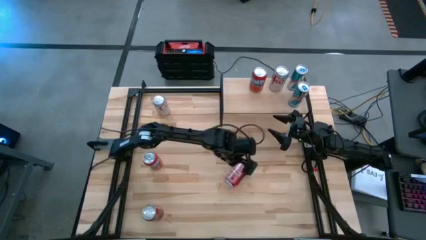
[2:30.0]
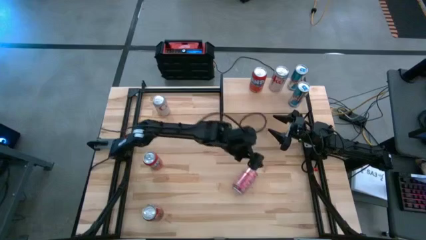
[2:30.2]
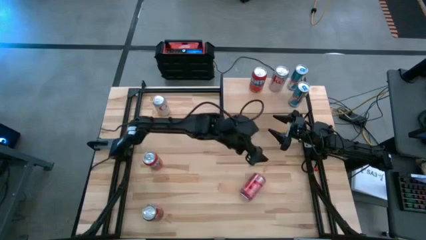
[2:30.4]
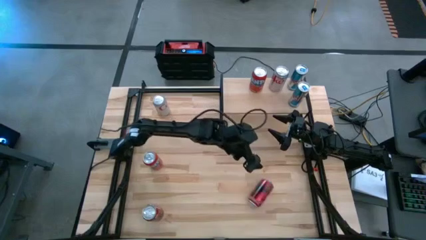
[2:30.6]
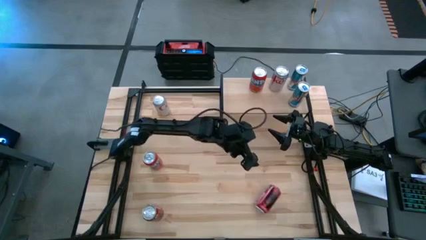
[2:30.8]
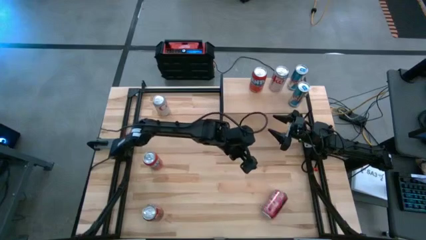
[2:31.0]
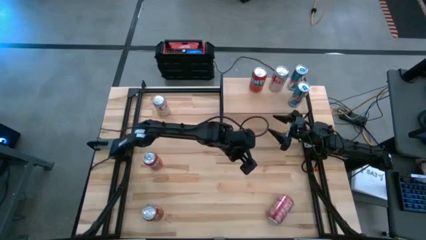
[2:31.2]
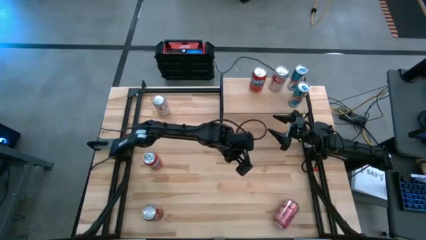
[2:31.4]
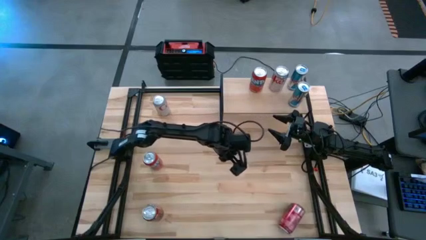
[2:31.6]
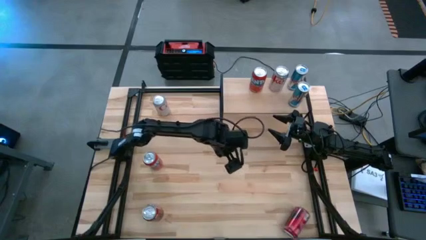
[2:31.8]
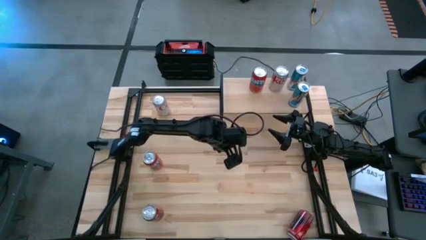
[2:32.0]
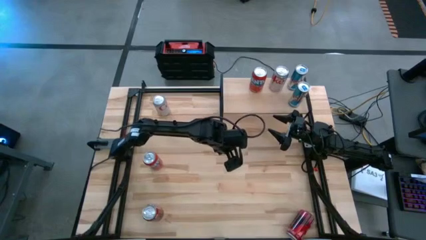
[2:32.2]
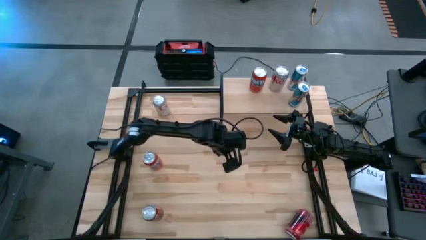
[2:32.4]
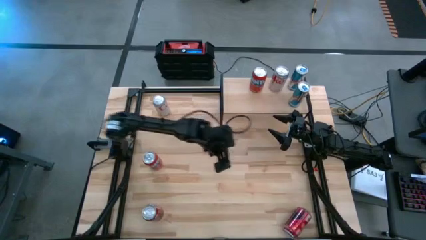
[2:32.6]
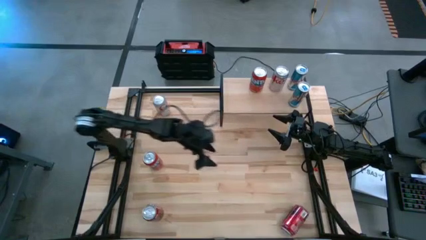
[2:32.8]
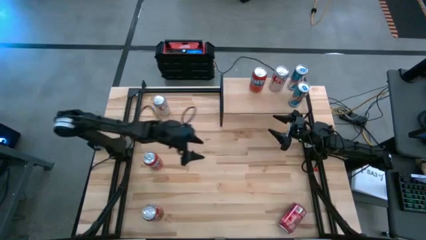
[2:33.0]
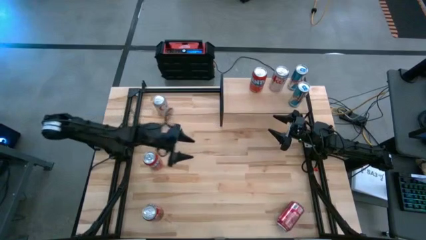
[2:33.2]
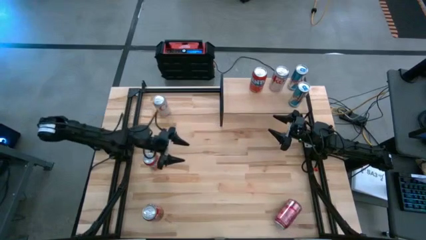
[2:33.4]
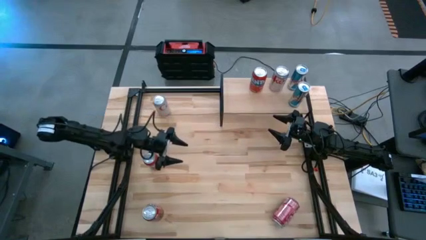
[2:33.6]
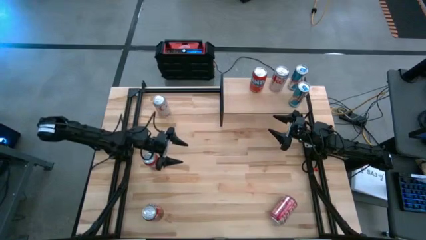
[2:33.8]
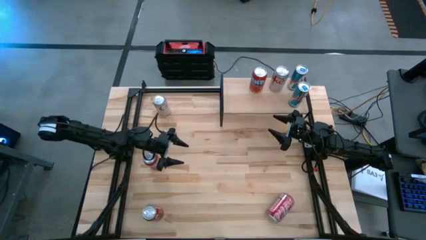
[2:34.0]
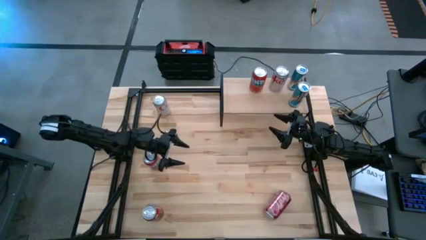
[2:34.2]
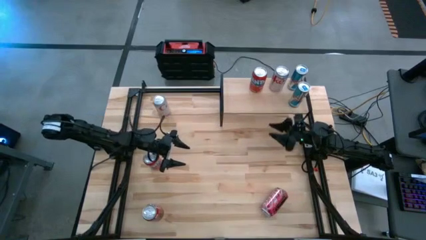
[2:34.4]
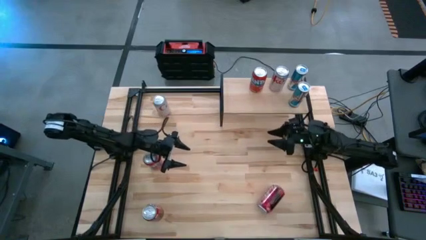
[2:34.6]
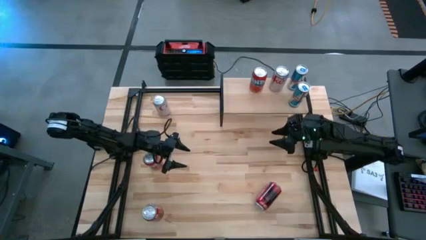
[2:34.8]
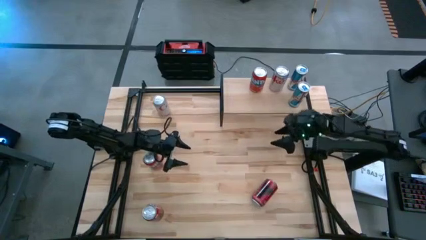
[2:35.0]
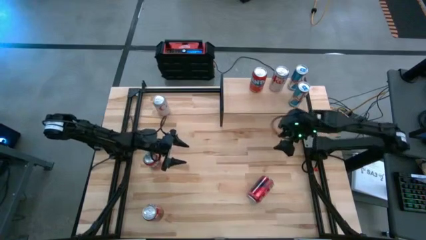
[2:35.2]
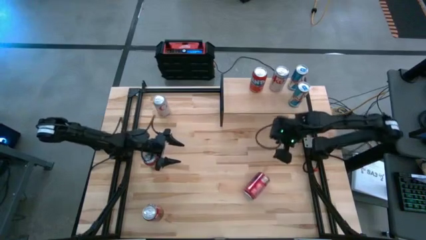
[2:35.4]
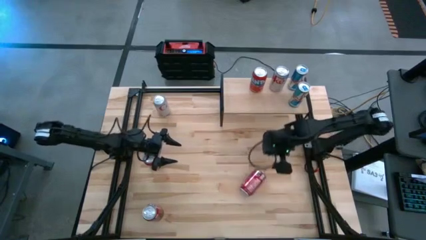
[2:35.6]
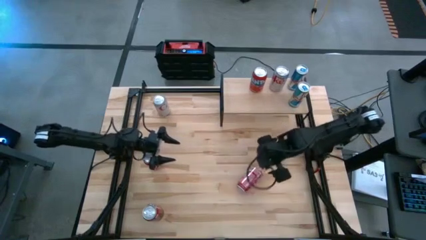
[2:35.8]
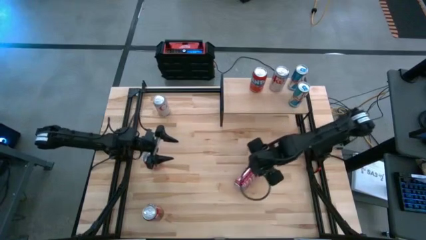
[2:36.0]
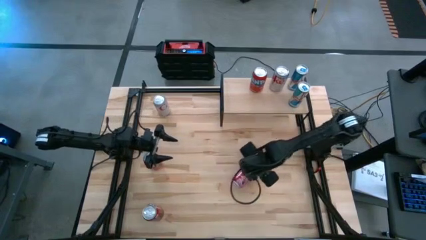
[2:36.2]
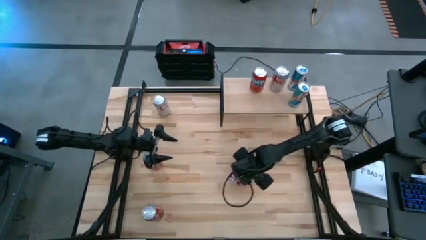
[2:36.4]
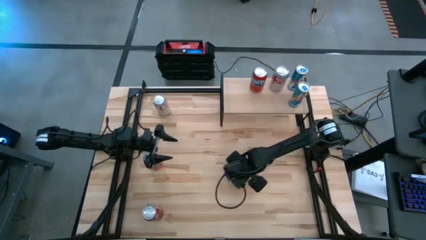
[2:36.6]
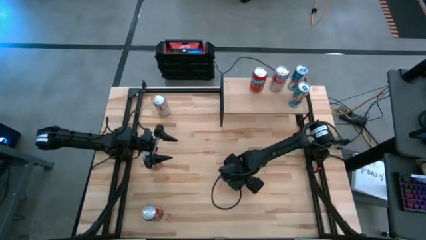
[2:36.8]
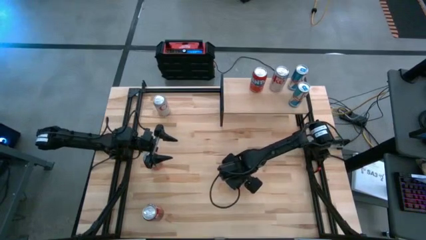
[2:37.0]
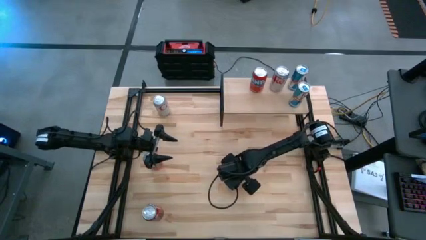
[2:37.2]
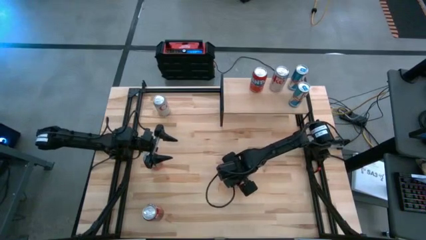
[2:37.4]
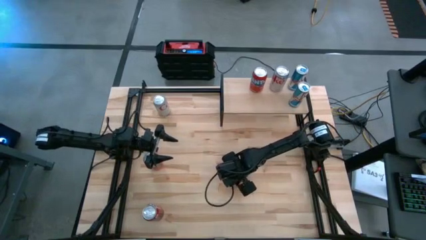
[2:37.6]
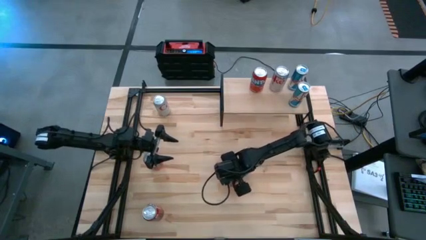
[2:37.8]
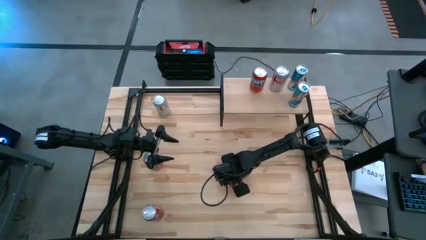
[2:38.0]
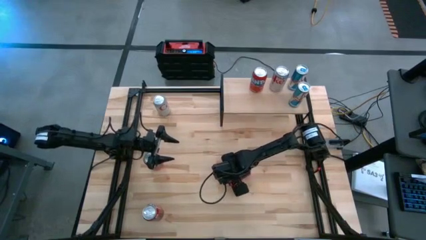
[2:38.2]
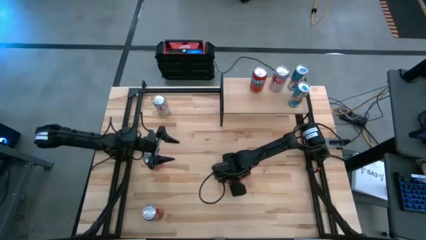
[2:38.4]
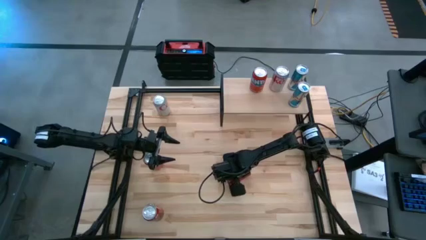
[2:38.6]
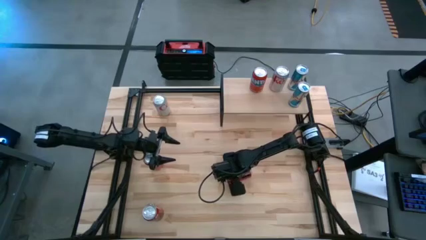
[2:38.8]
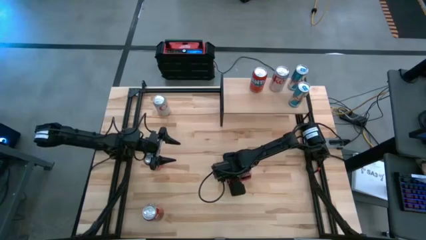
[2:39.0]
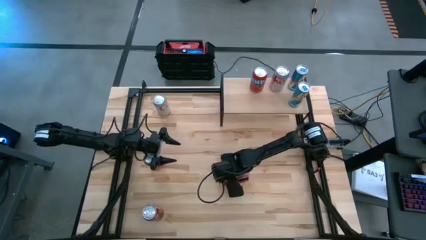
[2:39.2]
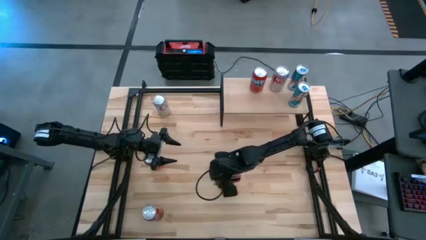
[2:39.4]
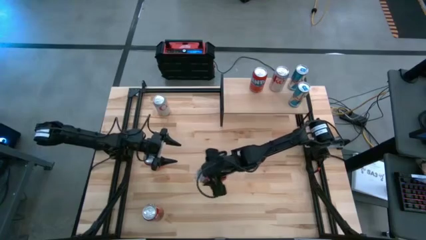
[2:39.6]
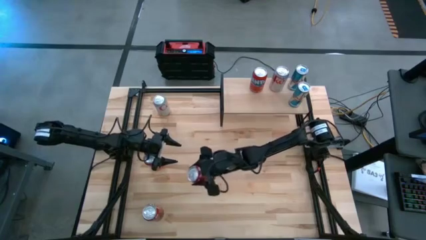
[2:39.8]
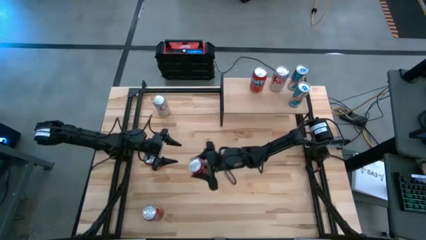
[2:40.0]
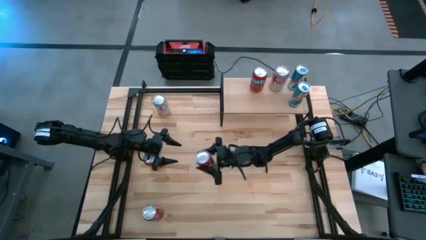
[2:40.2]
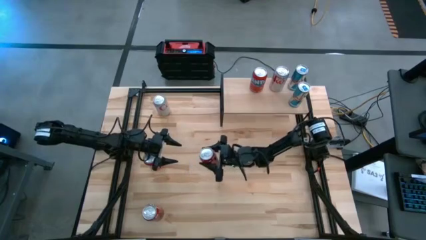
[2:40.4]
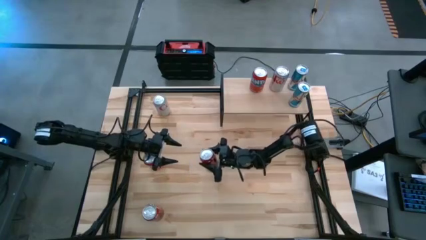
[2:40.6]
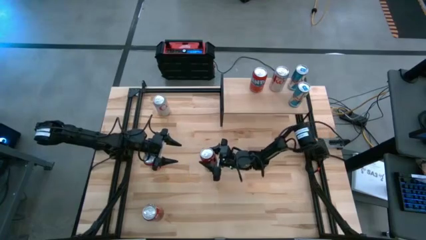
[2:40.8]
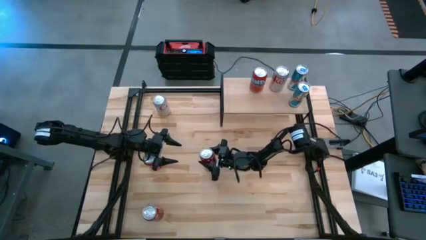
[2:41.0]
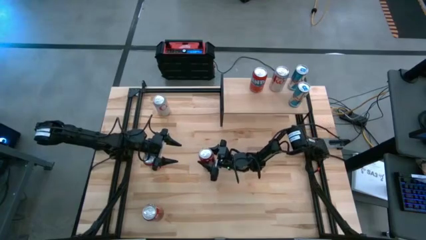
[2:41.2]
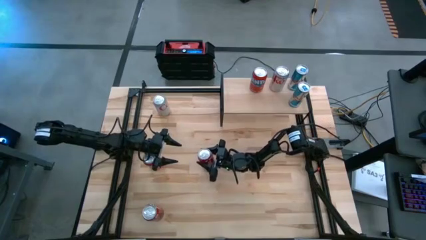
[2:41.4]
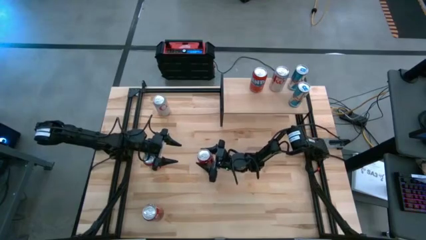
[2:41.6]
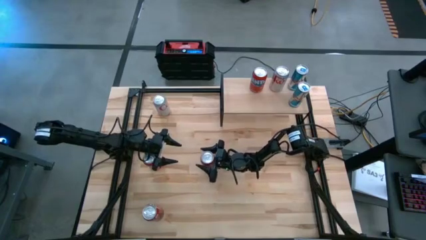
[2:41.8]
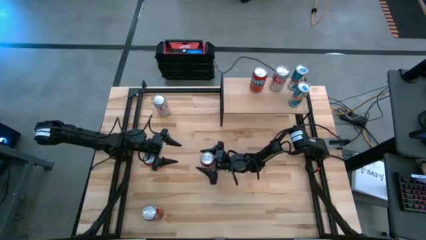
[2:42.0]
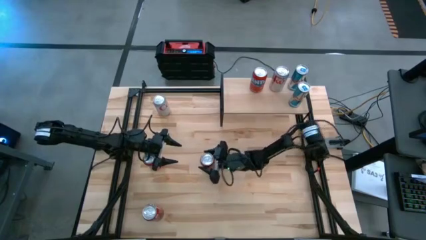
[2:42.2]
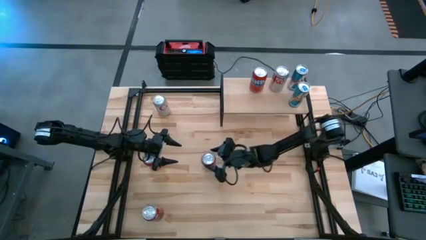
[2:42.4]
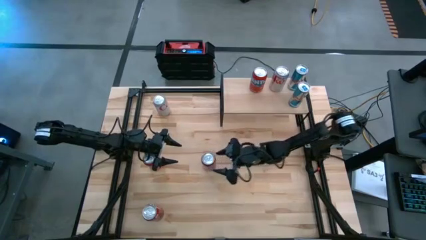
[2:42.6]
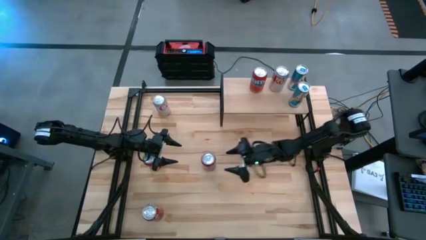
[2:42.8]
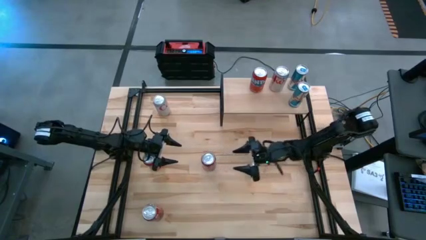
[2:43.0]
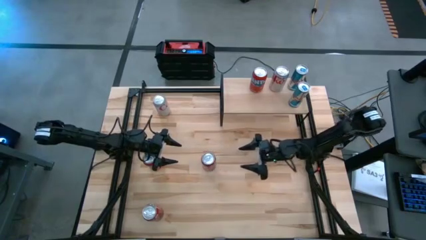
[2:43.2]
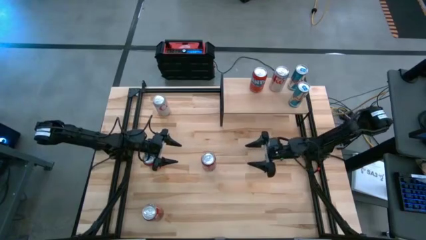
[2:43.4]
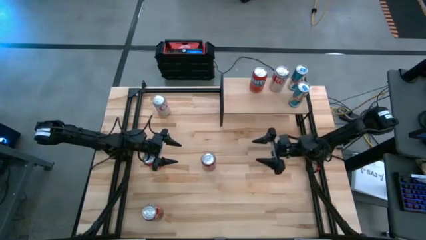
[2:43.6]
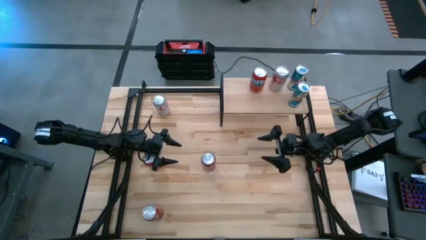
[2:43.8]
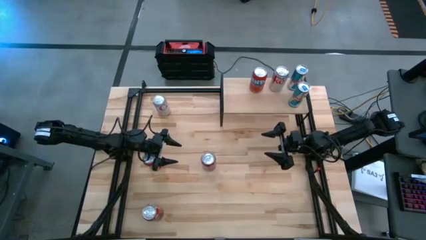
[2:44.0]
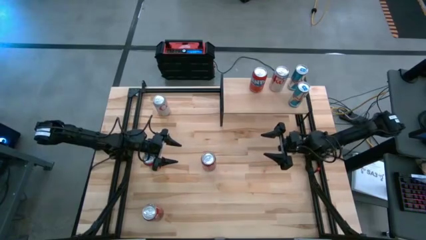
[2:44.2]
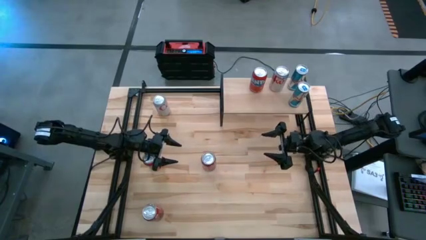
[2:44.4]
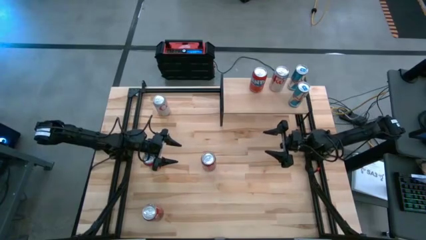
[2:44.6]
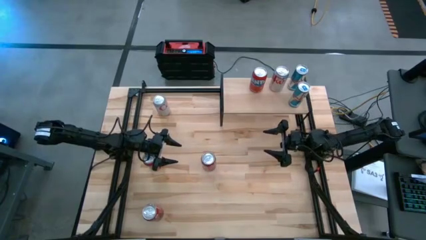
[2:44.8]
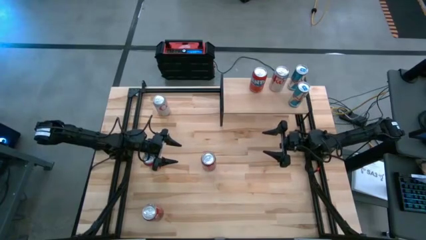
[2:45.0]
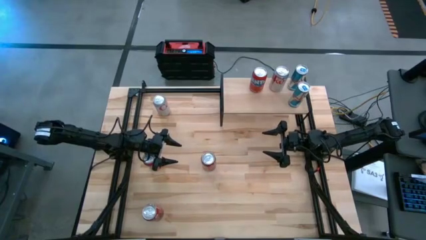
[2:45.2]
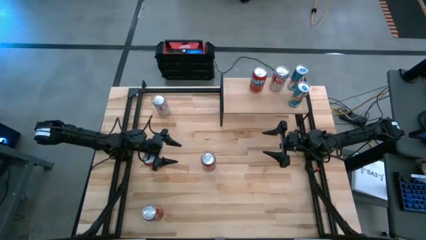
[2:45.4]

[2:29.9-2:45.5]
Task: Place canned beverage on shelf
Put the top red white soda can on the shelf

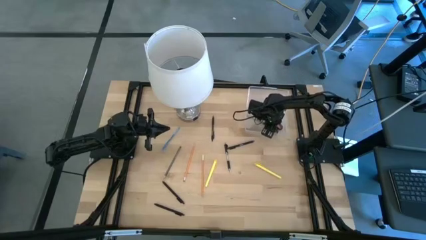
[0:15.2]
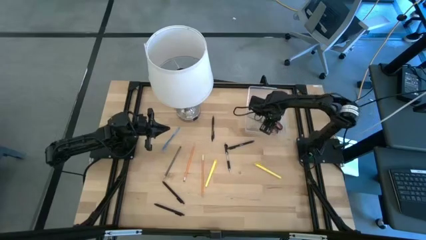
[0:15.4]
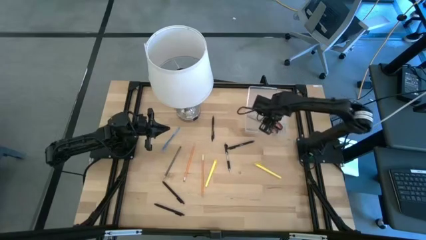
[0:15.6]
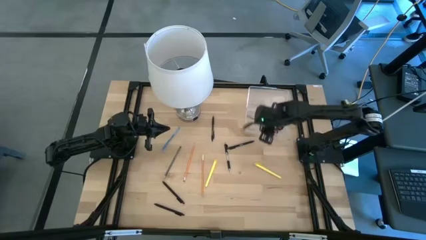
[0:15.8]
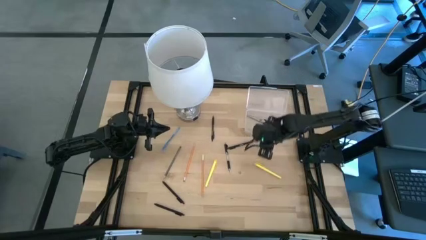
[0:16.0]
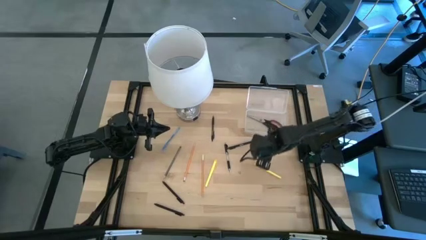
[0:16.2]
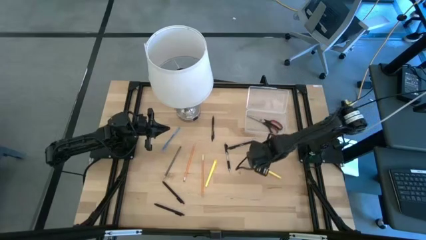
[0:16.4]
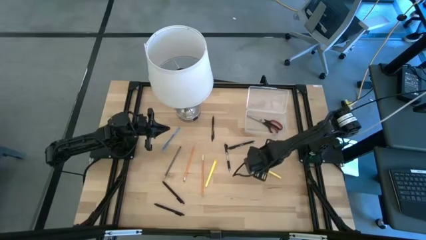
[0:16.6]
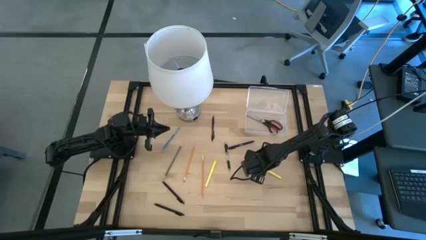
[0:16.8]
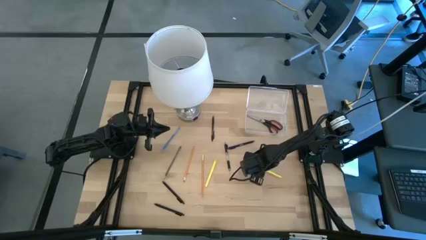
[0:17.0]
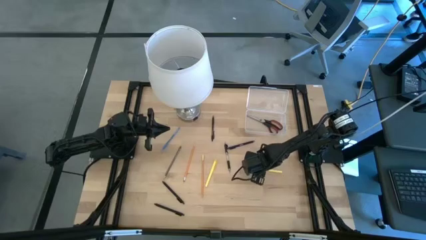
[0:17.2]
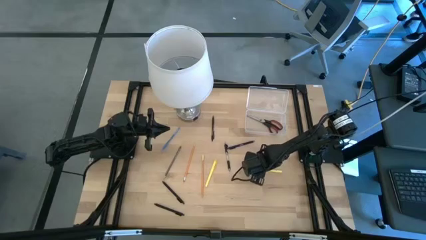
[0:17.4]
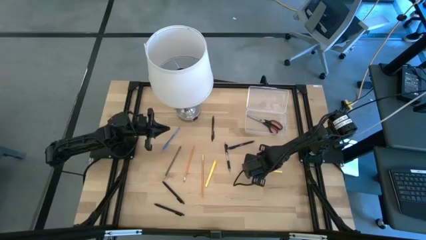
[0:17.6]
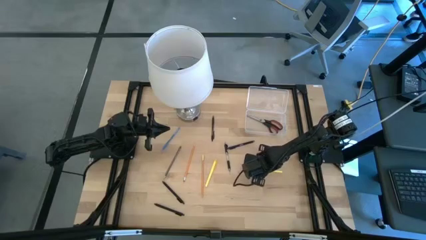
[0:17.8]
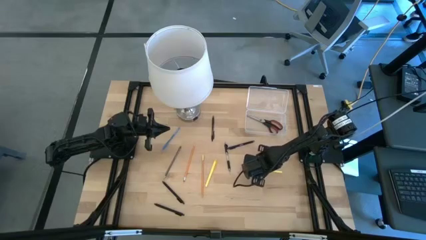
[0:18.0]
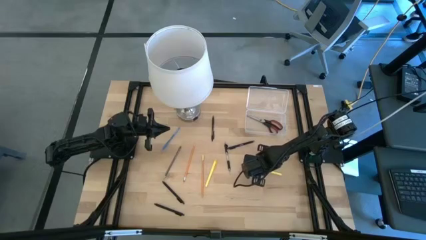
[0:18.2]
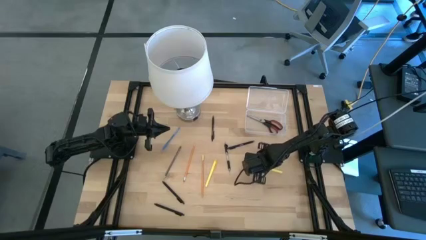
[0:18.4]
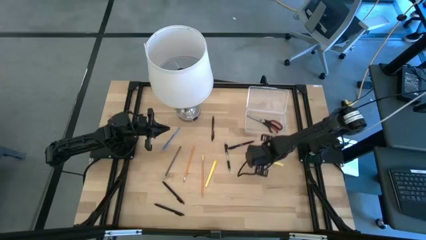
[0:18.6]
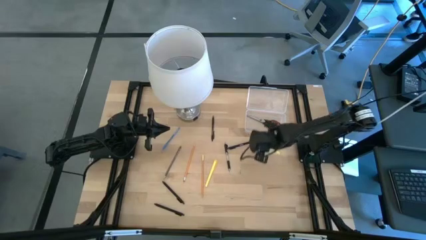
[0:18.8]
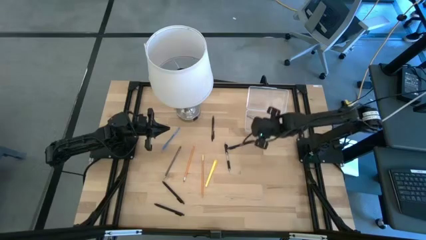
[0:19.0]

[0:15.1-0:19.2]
Task: Pick & place school supplies into a supply box
Put the yellow pen into the transparent supply box
